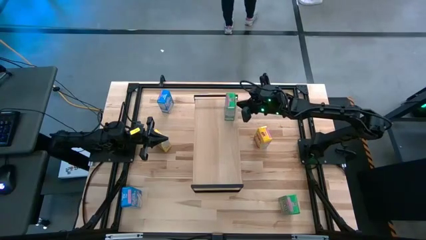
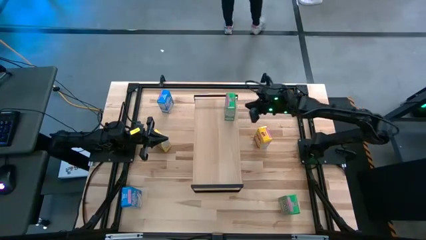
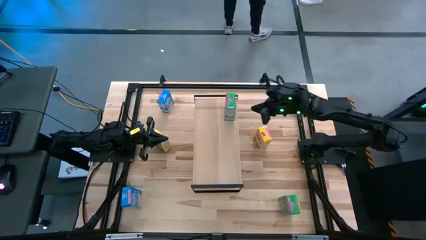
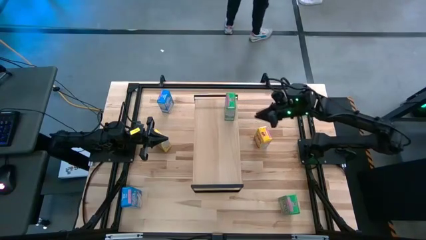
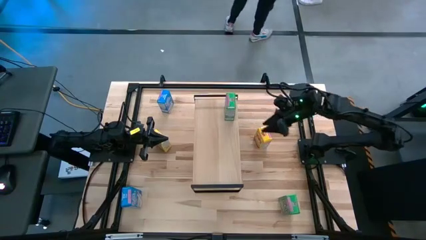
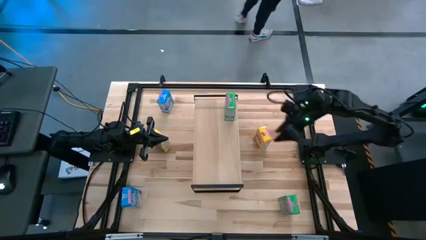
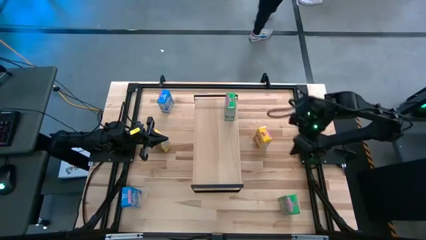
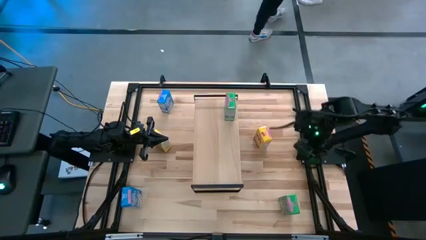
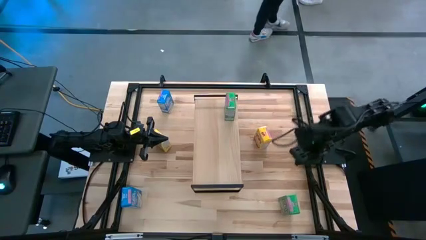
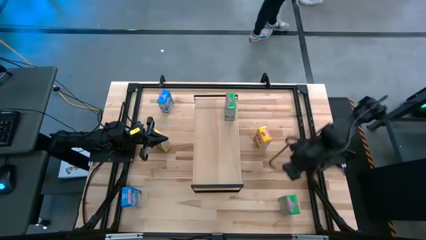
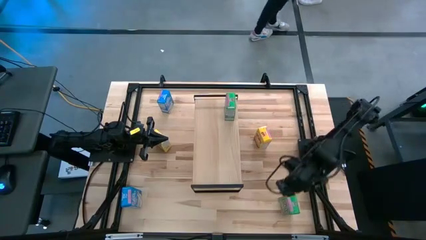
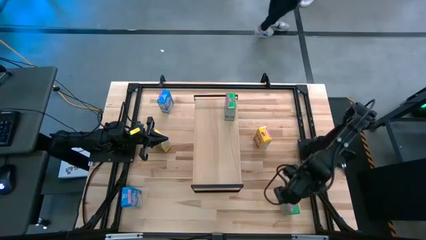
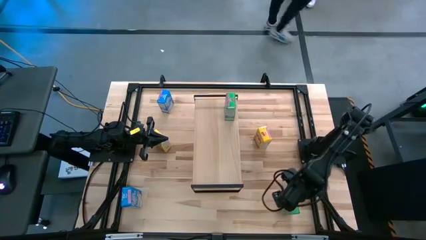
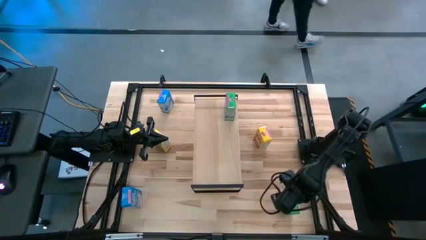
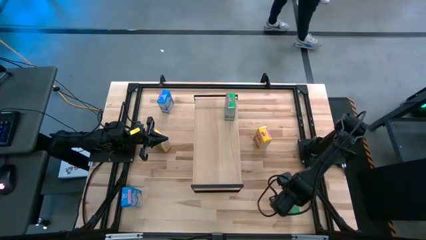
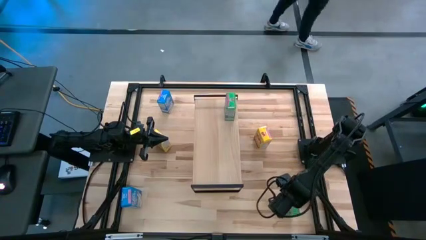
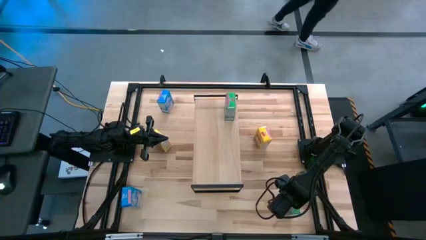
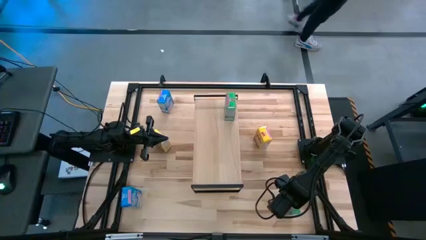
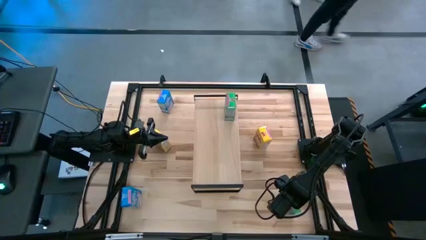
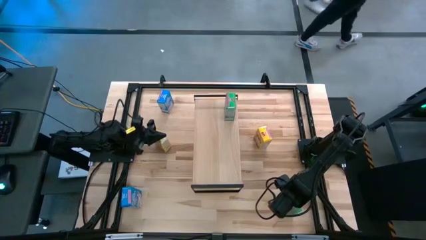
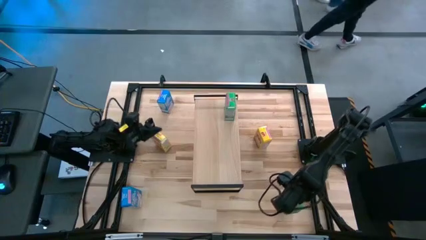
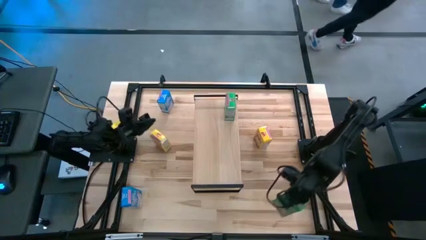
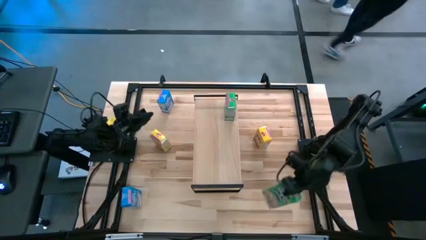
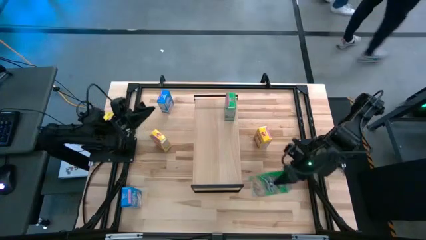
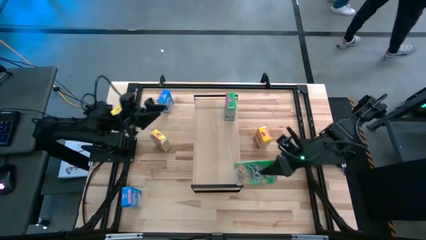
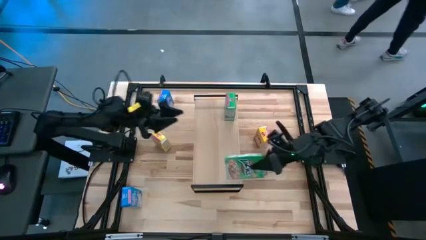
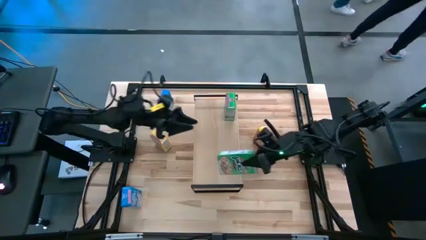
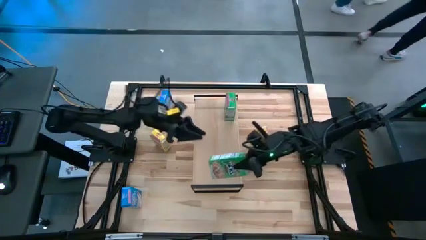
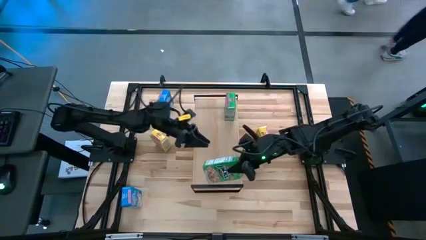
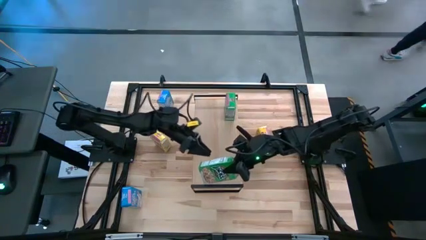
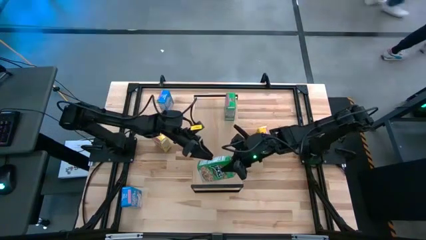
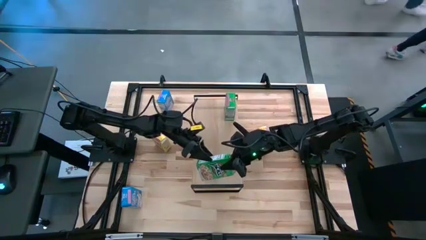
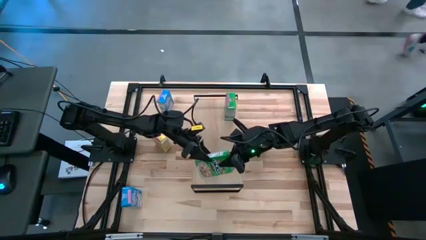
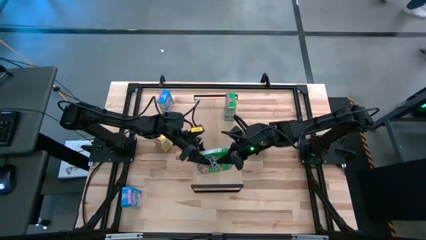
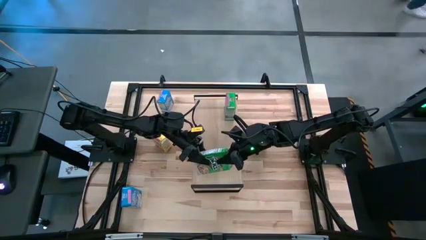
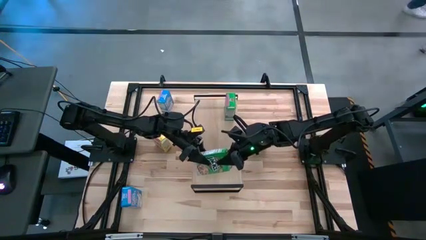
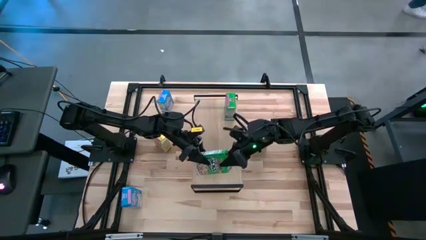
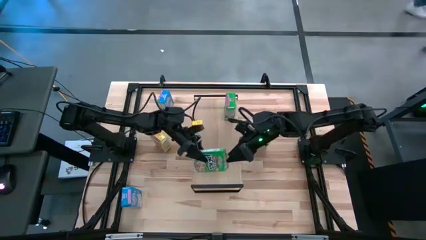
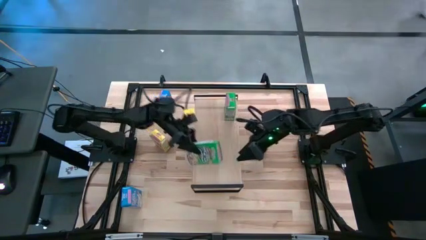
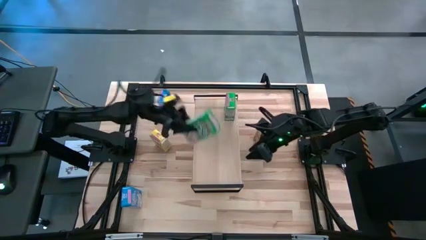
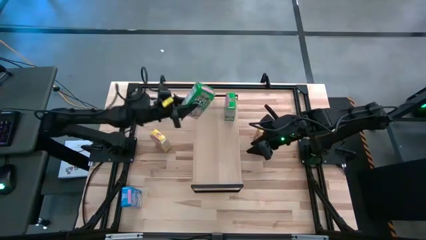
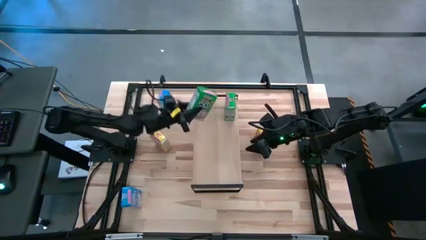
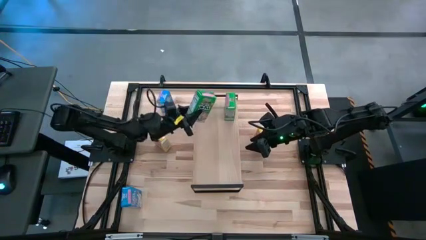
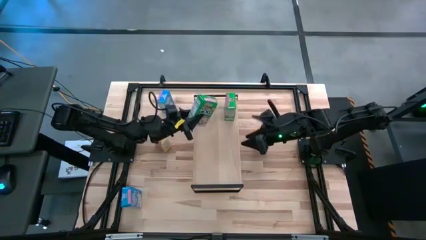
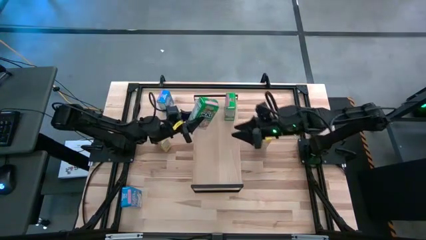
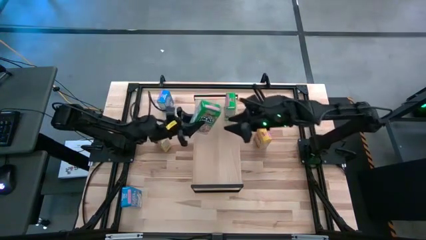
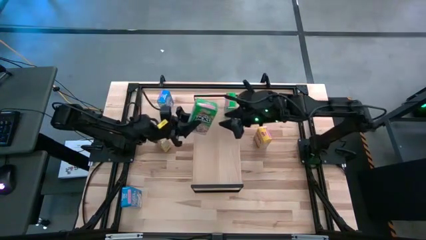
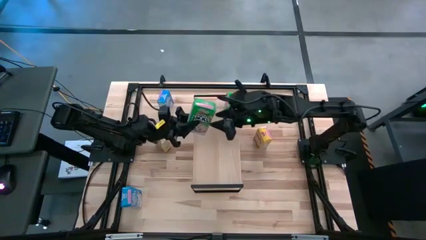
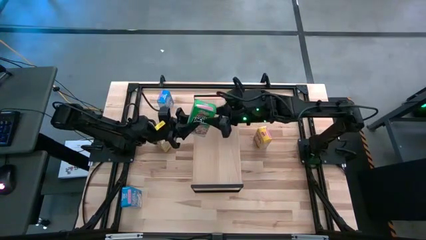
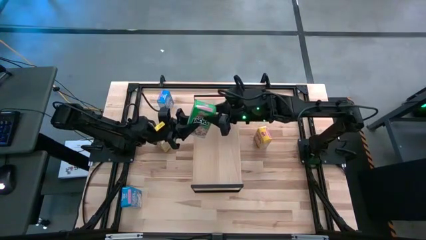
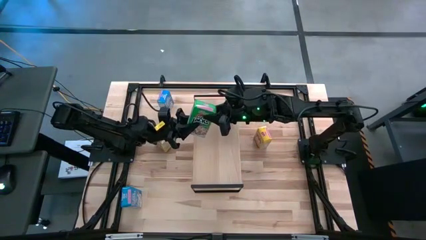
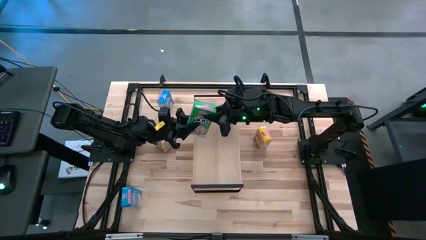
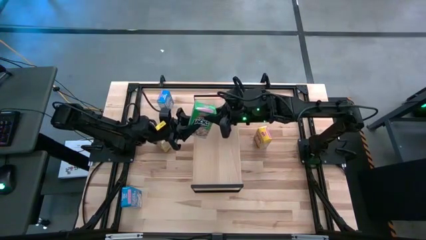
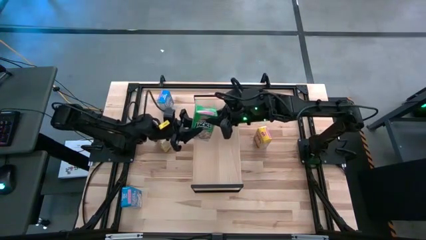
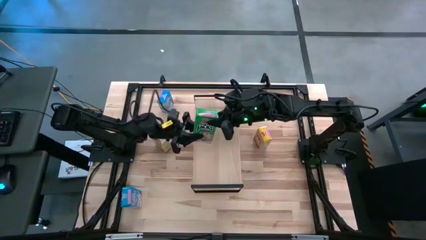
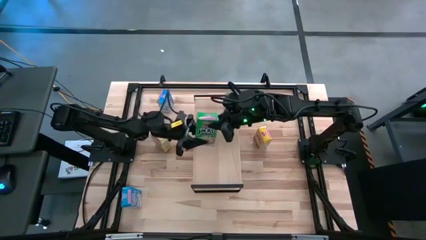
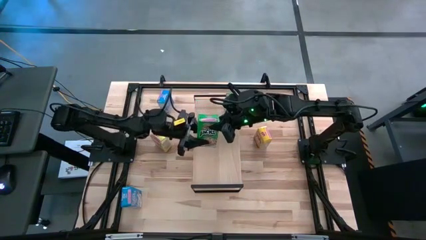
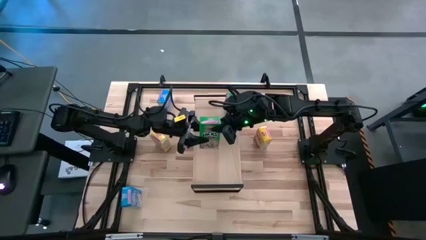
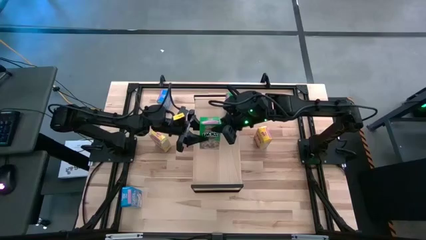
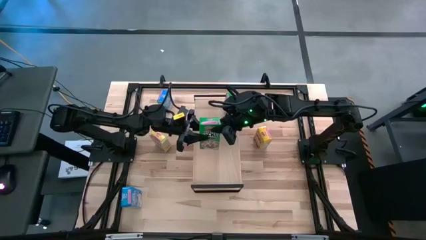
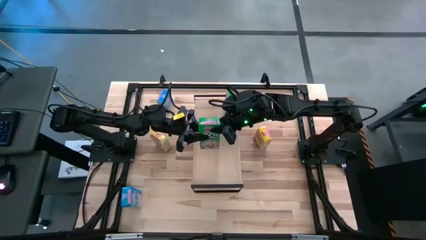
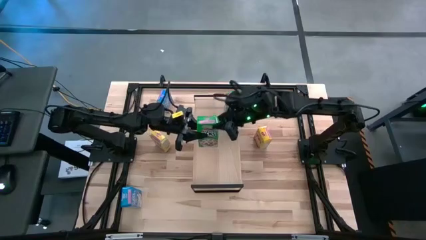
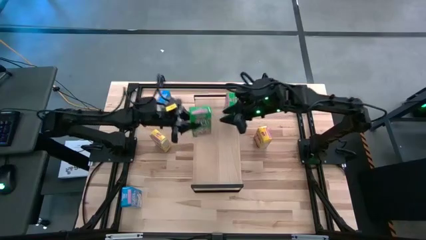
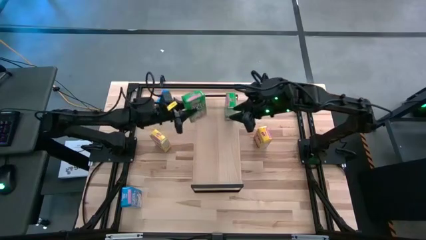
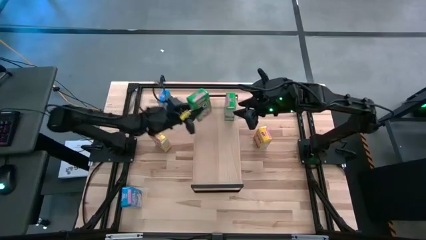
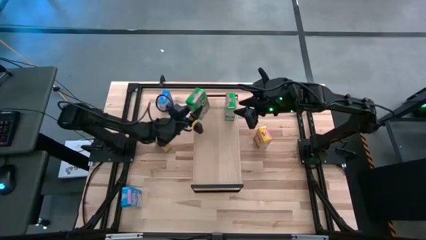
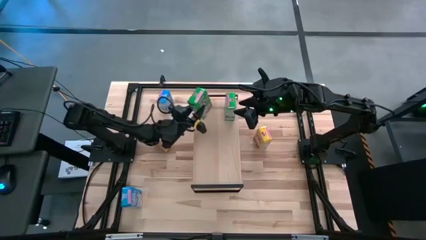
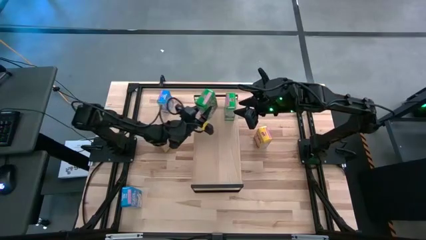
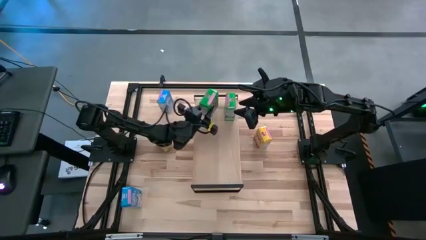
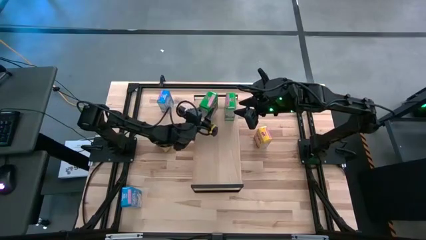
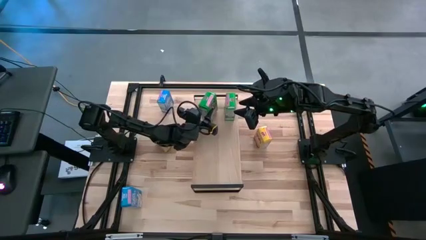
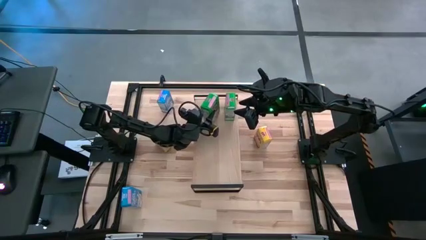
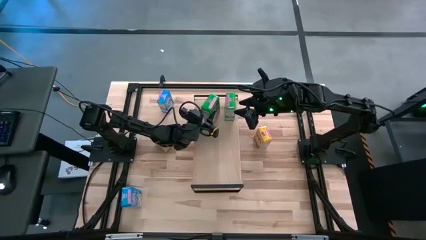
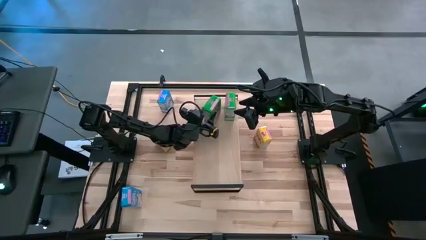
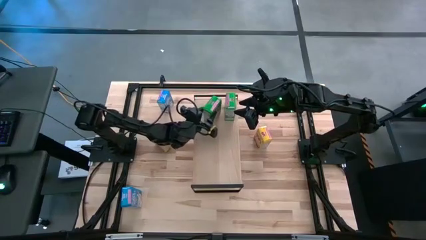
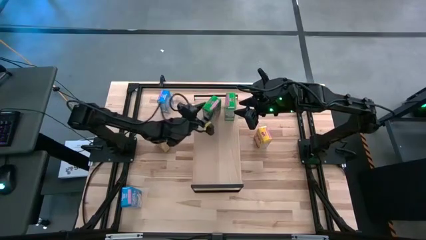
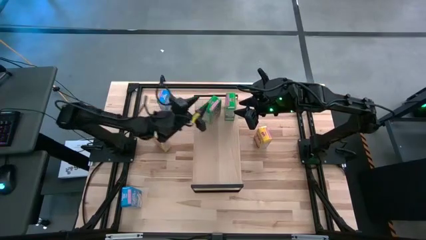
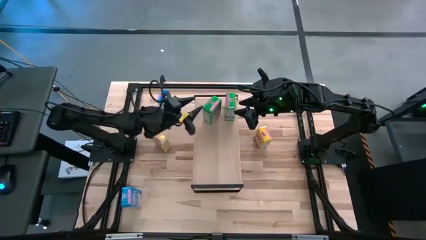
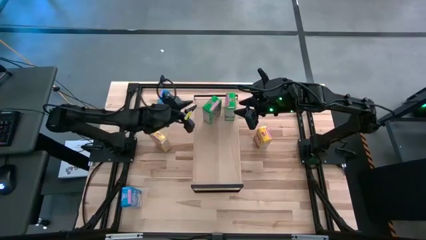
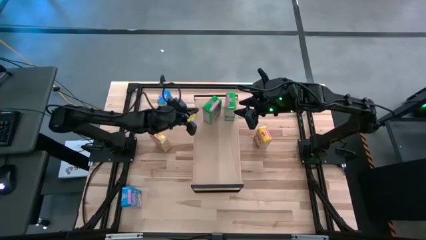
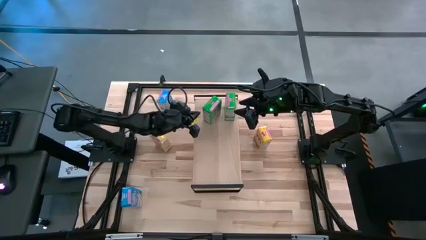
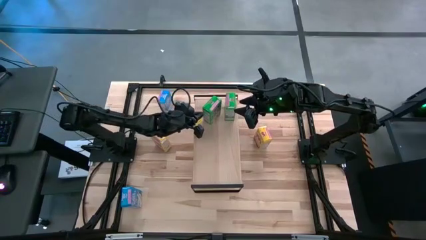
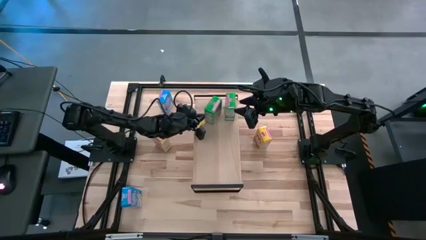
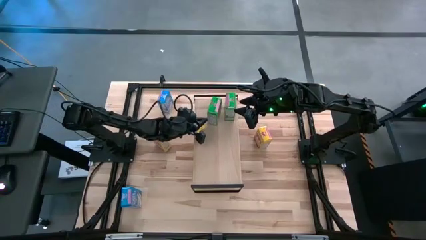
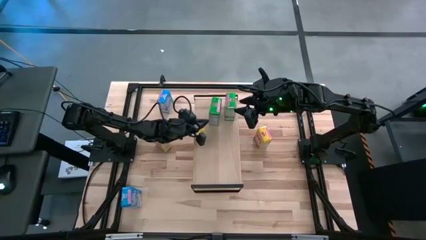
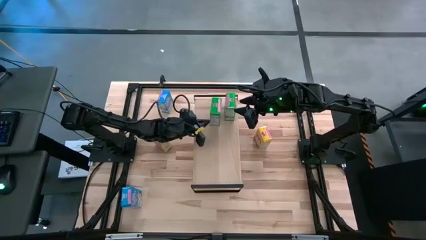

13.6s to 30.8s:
Task: Stack cereal on shelf
Put the green cereal box on the shelf
